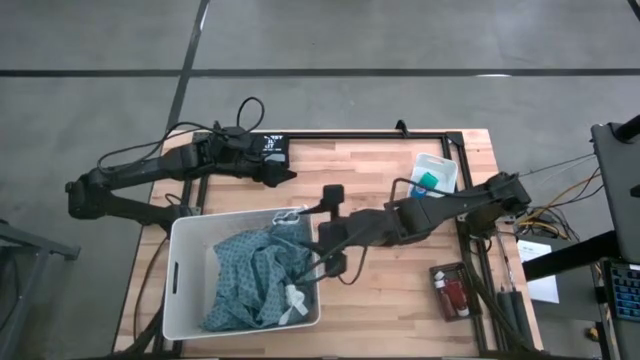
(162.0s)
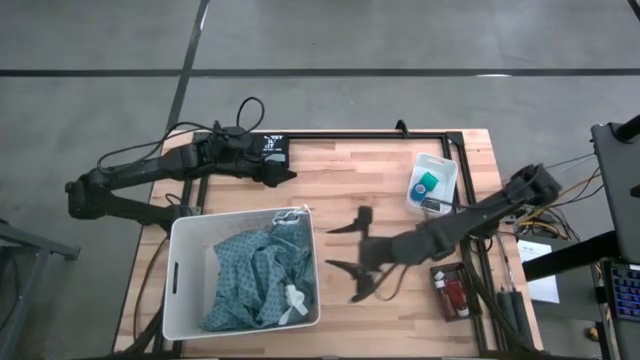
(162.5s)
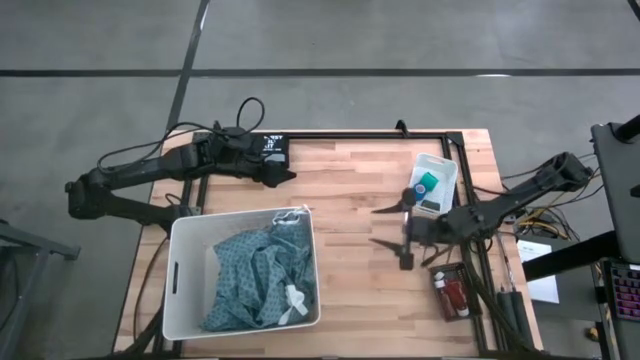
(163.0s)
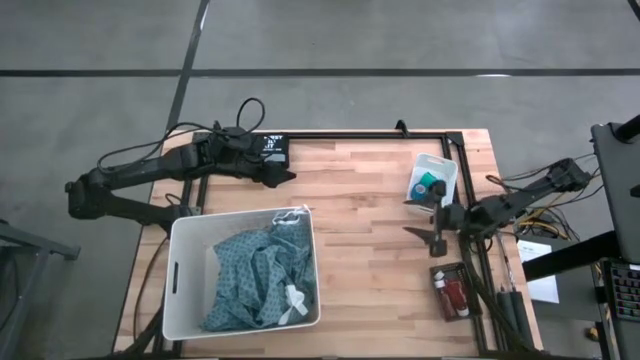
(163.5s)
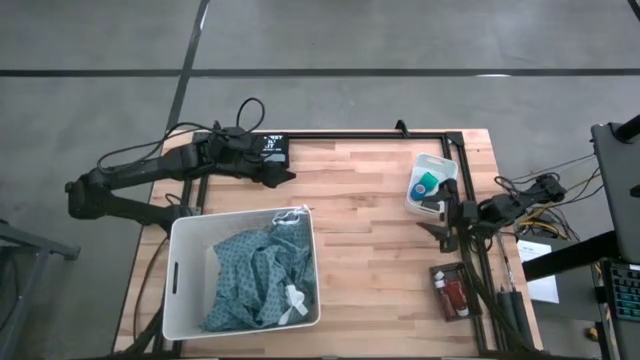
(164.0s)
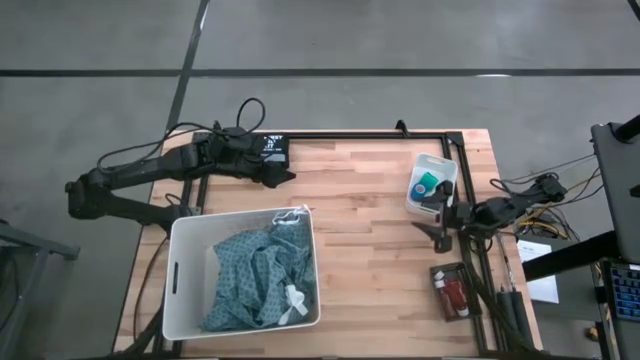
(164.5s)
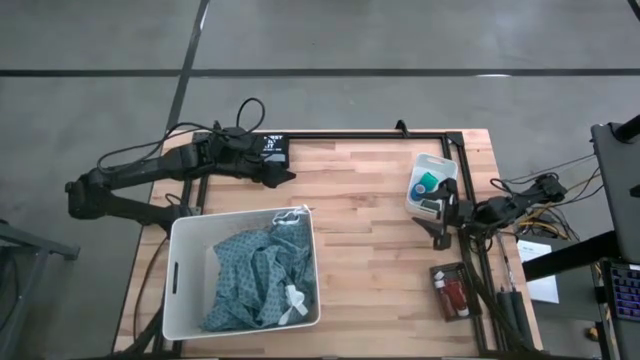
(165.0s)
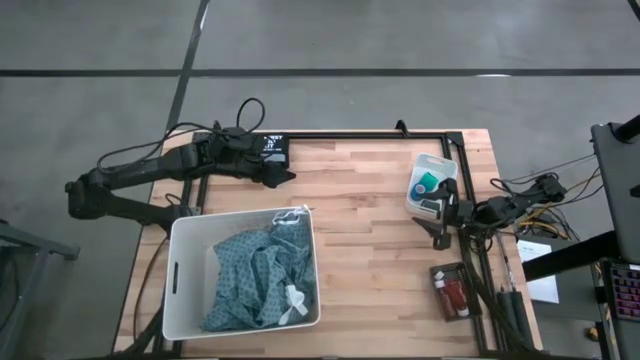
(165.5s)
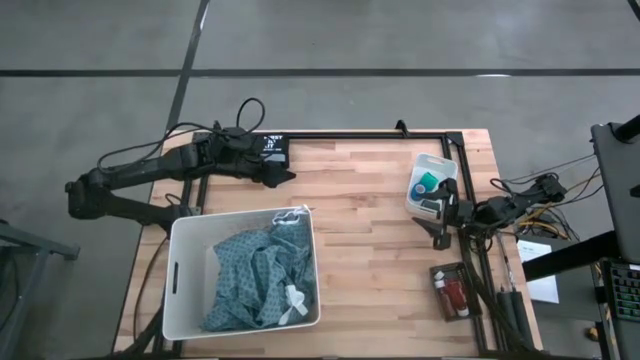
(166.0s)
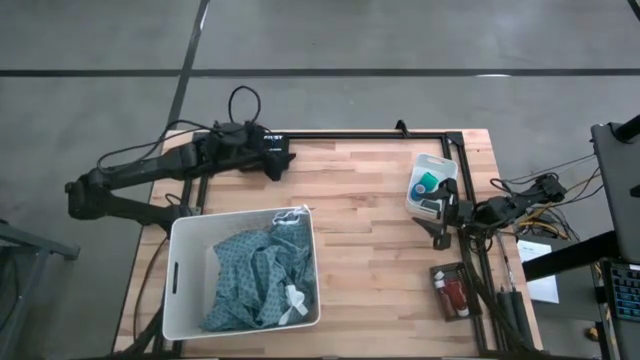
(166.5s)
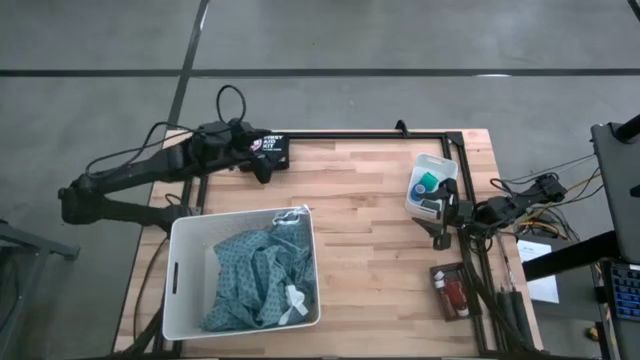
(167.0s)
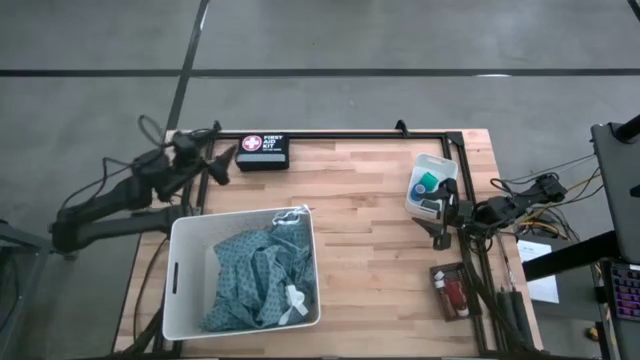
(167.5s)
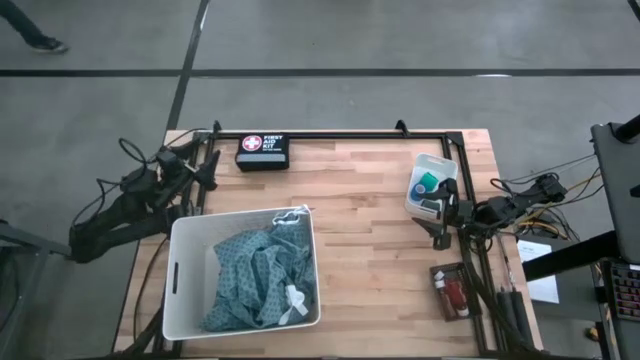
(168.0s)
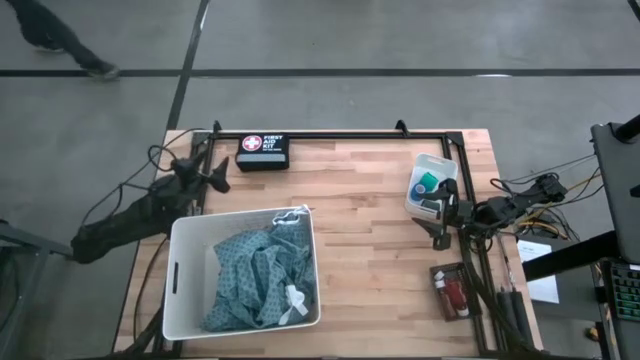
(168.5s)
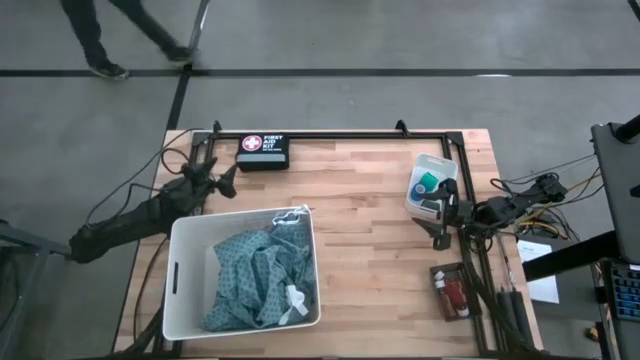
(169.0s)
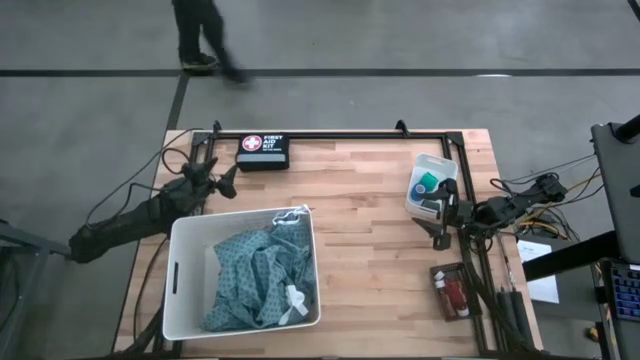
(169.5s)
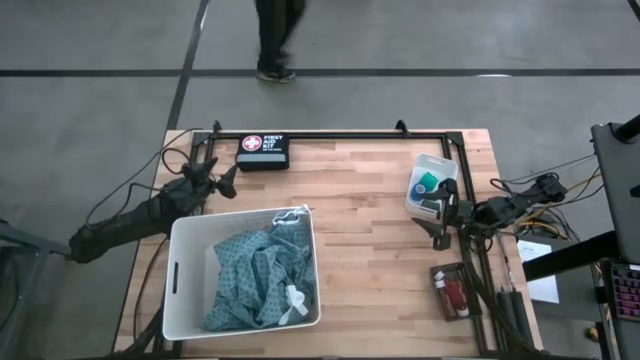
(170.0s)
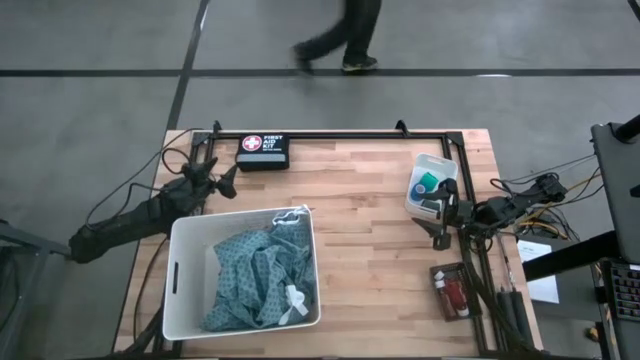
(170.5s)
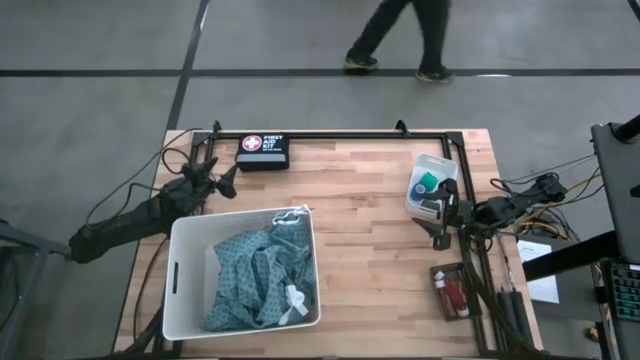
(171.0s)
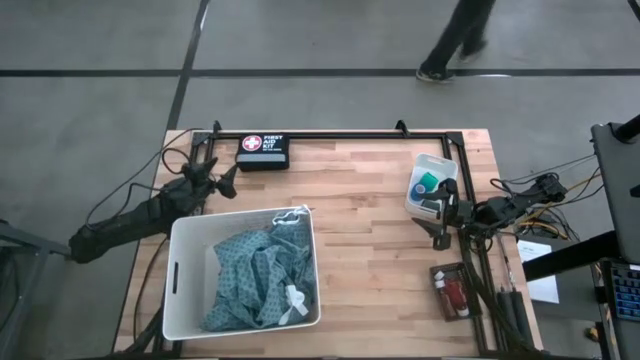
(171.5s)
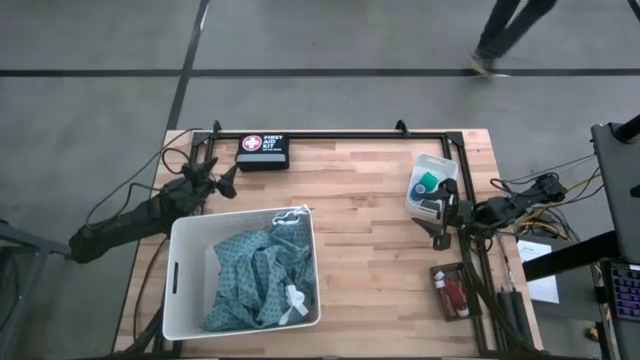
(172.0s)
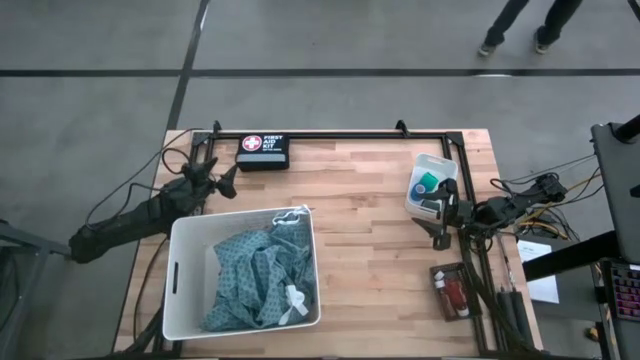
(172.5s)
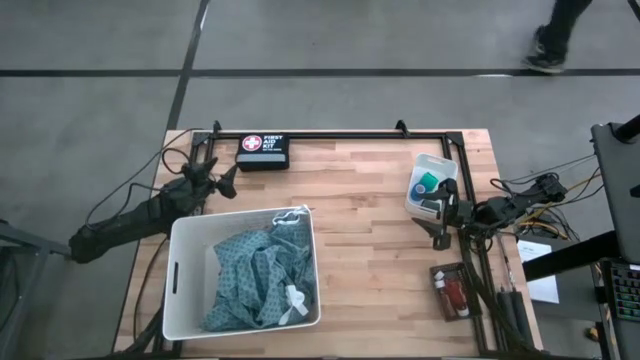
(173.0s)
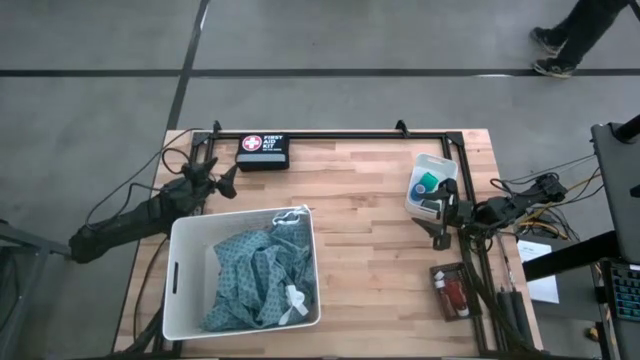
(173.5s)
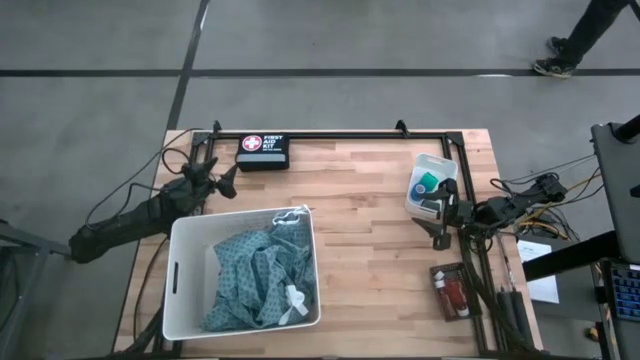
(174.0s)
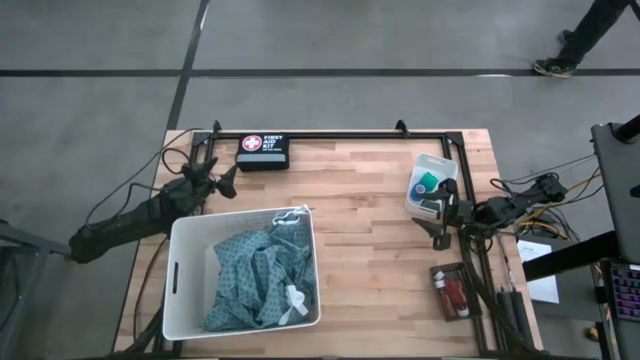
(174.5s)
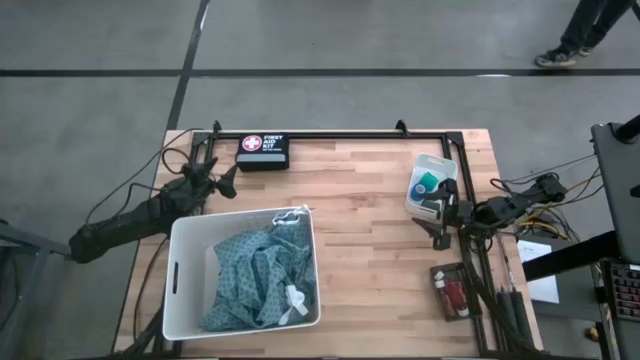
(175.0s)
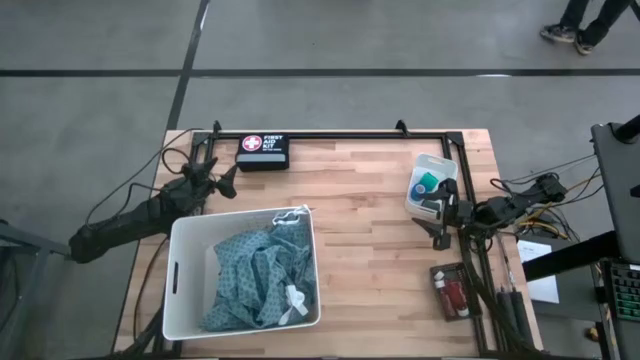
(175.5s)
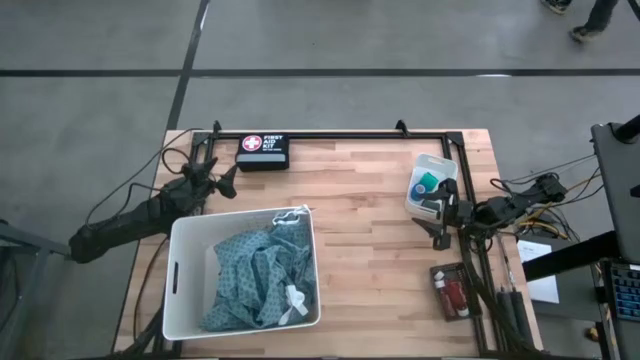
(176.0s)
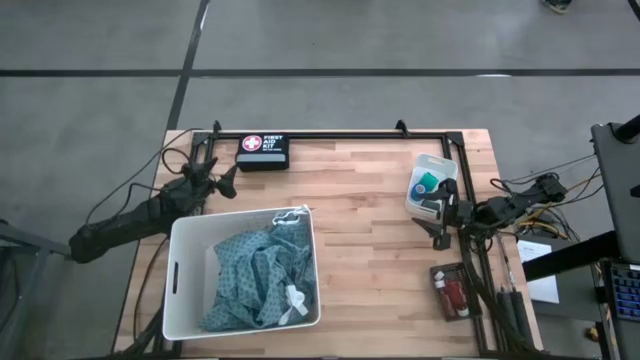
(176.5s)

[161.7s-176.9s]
Task: Pick & Place Medicine items
Return to Home Position

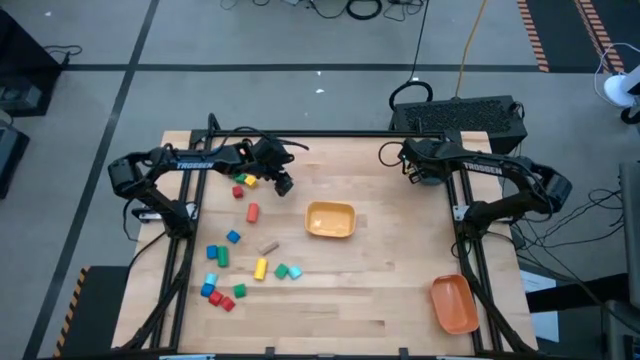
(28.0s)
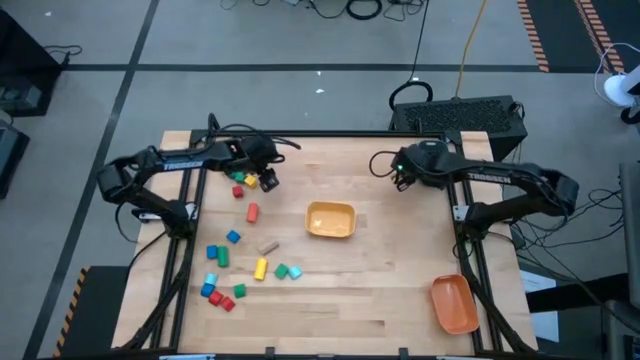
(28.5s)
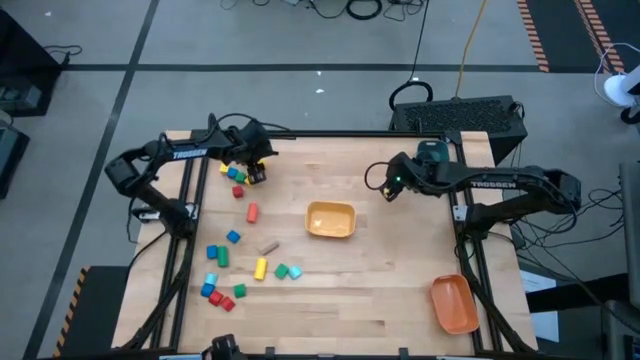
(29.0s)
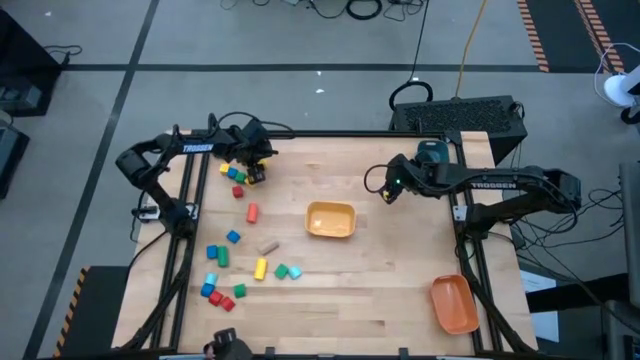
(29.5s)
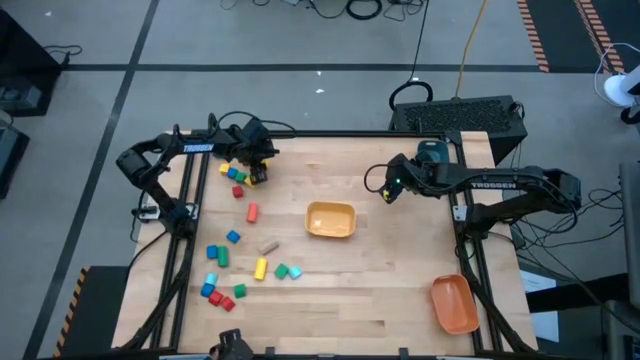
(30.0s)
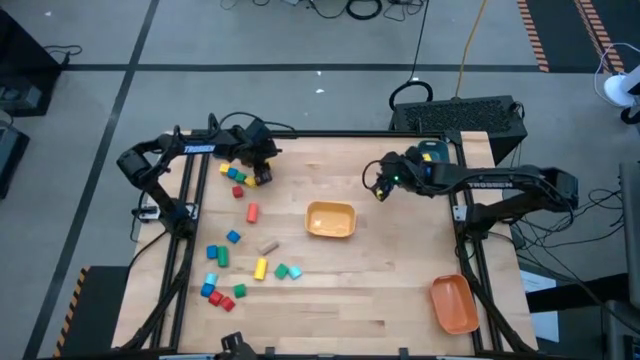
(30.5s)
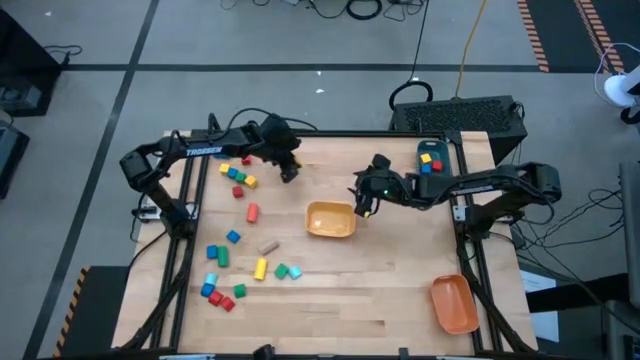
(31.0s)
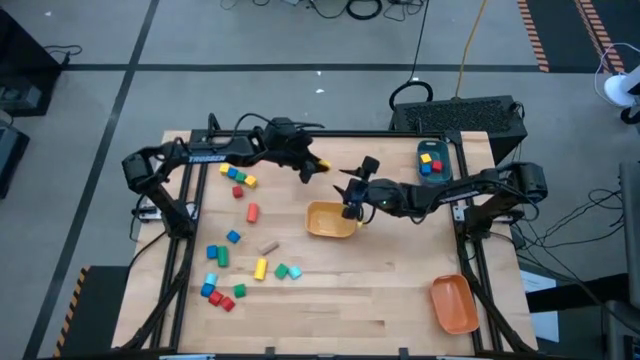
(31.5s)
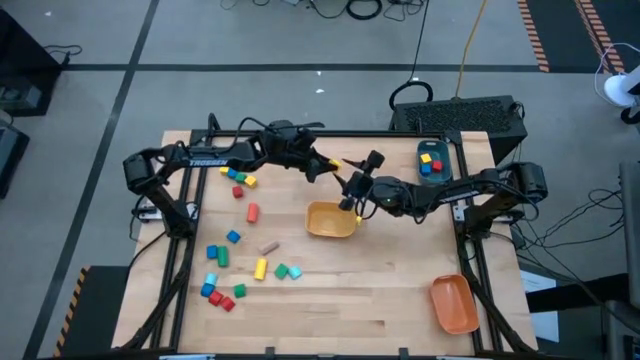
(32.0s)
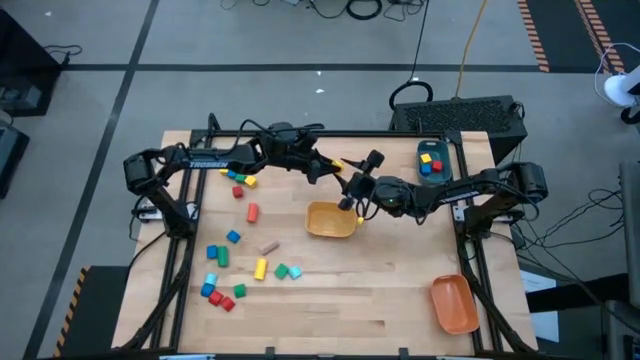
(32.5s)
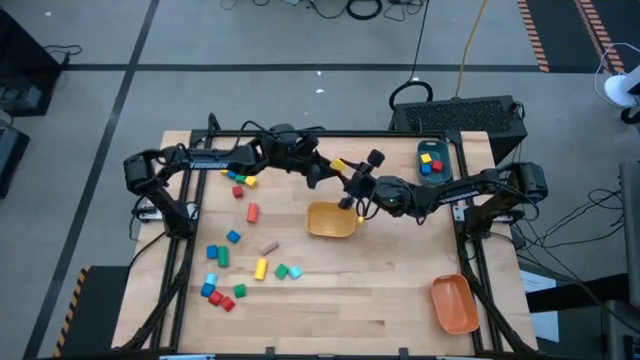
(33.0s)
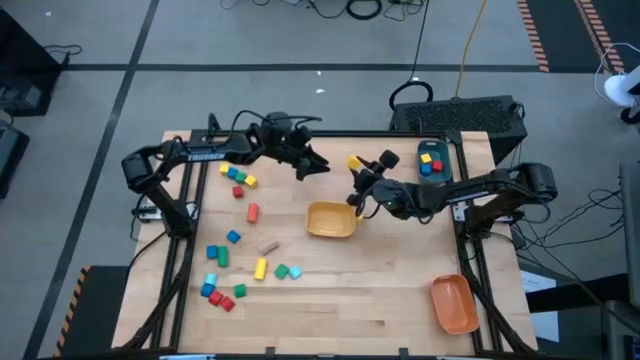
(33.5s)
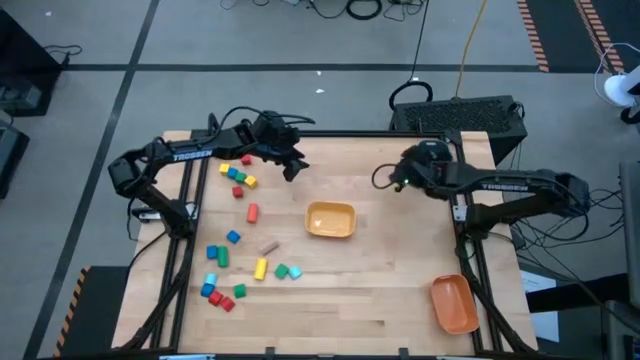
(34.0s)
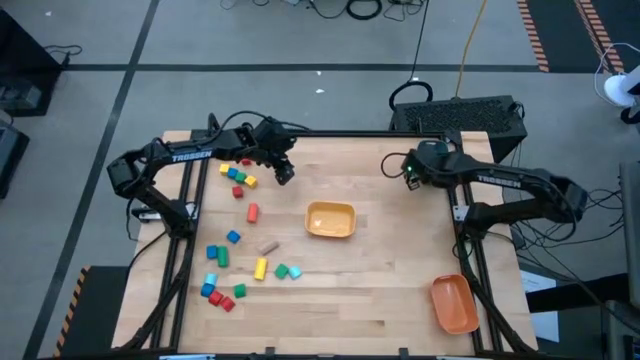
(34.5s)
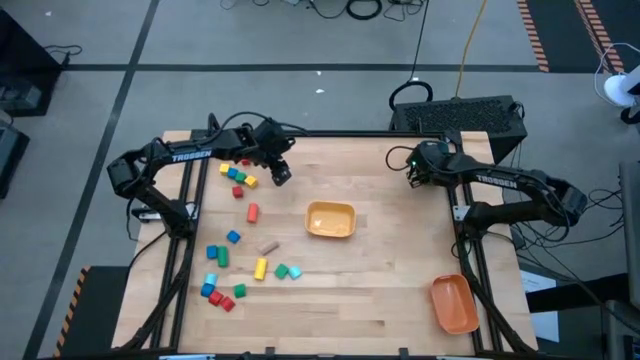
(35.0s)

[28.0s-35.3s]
Task: Sort blocks by size
Put the yellow square block into the blue bin
